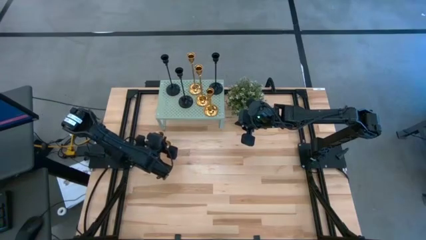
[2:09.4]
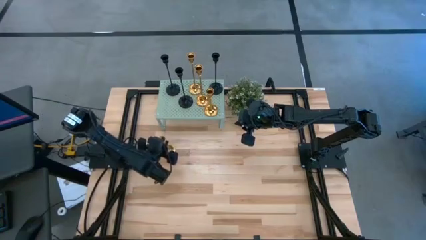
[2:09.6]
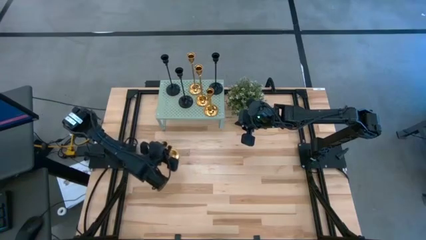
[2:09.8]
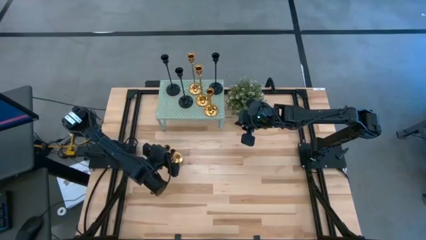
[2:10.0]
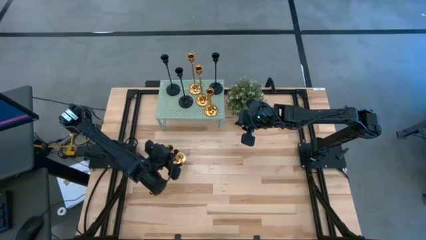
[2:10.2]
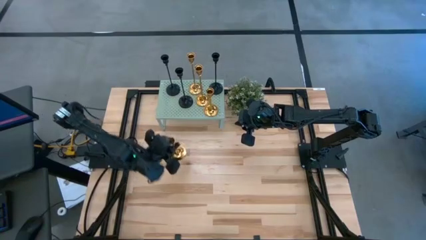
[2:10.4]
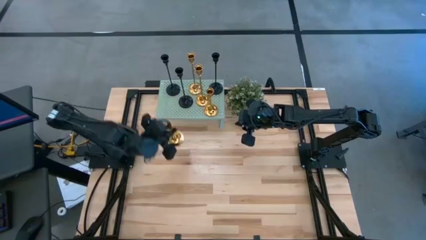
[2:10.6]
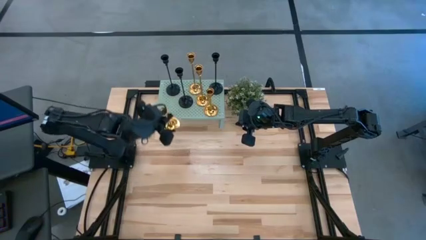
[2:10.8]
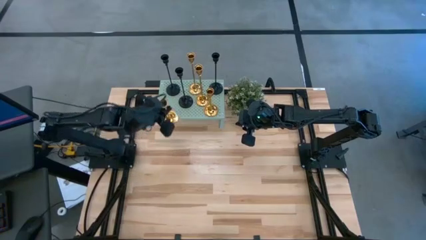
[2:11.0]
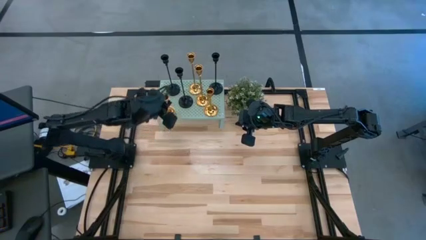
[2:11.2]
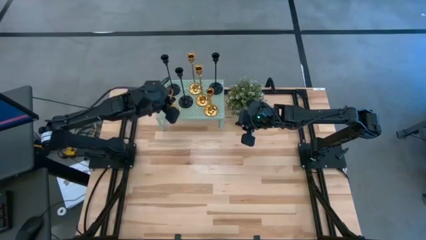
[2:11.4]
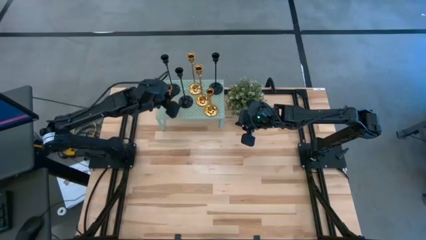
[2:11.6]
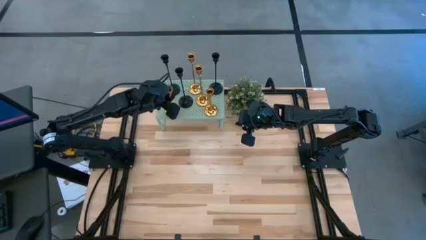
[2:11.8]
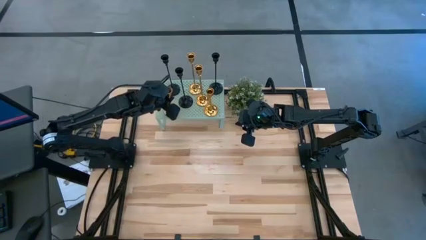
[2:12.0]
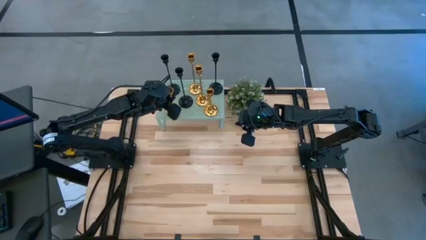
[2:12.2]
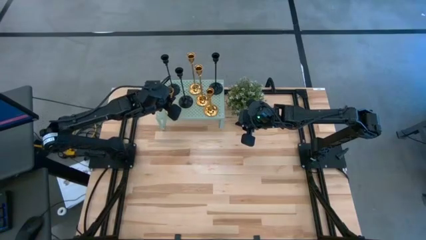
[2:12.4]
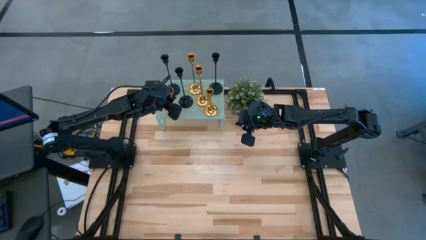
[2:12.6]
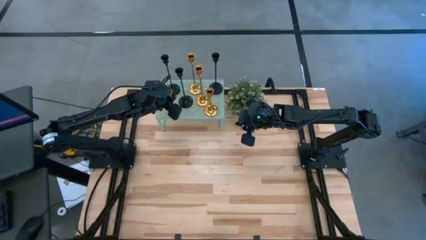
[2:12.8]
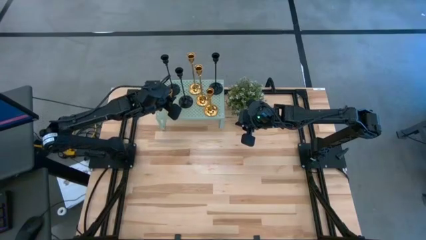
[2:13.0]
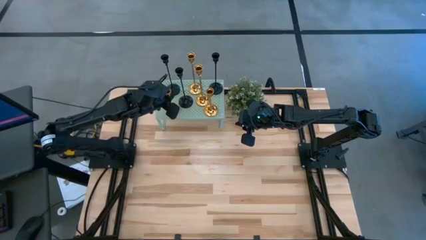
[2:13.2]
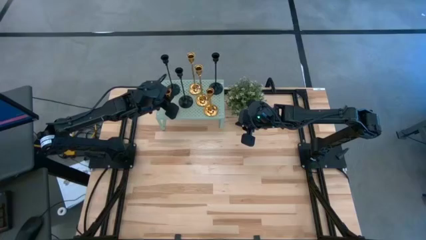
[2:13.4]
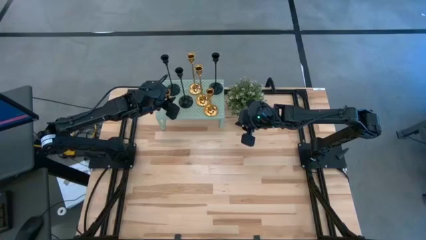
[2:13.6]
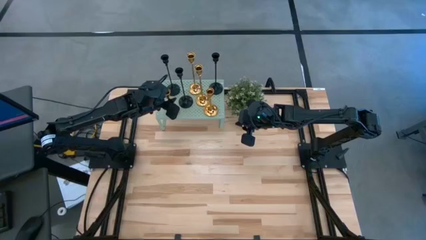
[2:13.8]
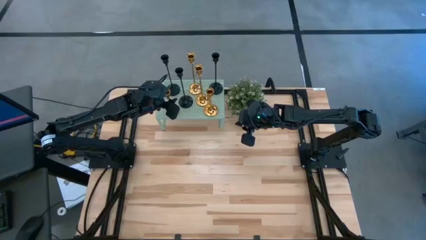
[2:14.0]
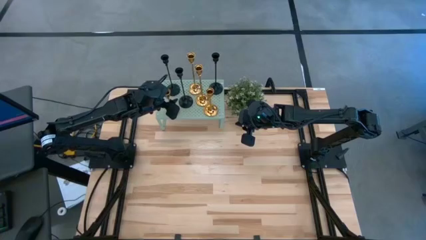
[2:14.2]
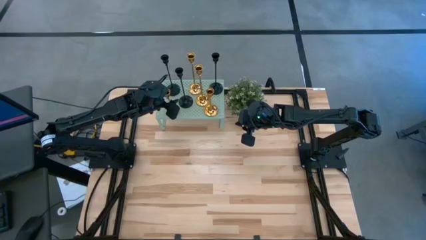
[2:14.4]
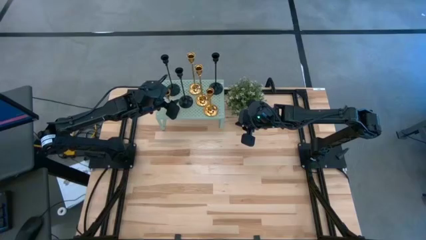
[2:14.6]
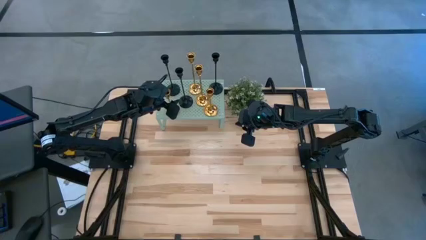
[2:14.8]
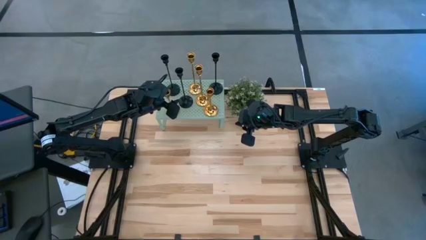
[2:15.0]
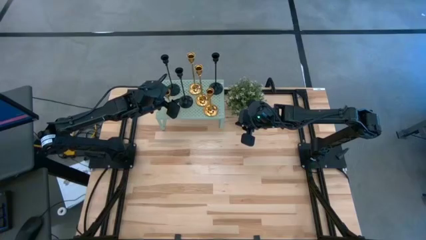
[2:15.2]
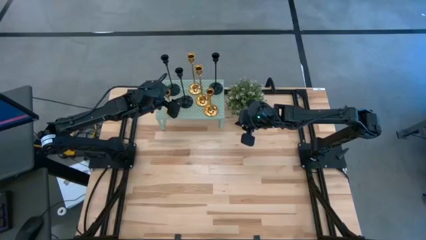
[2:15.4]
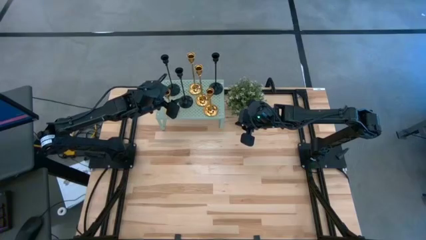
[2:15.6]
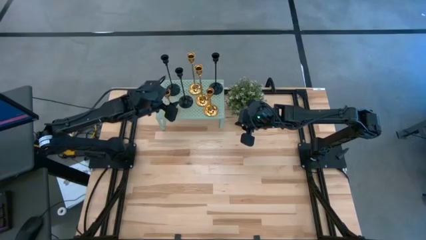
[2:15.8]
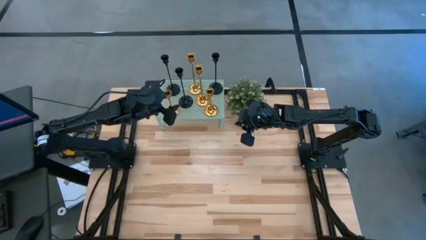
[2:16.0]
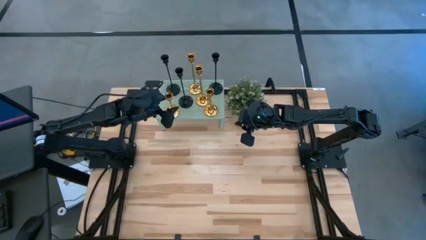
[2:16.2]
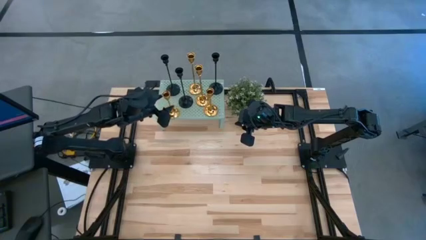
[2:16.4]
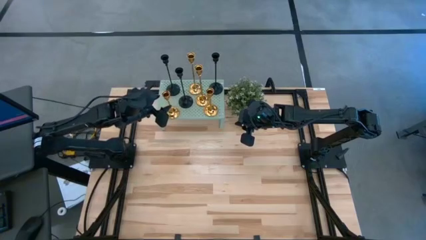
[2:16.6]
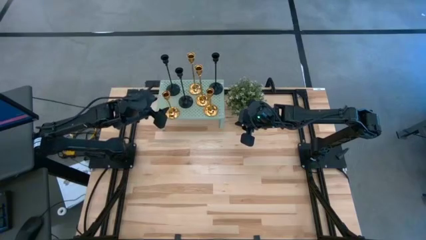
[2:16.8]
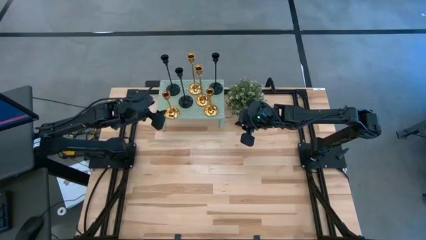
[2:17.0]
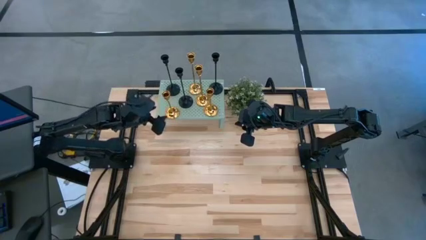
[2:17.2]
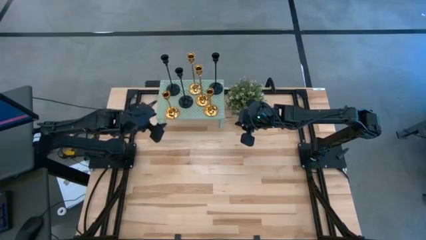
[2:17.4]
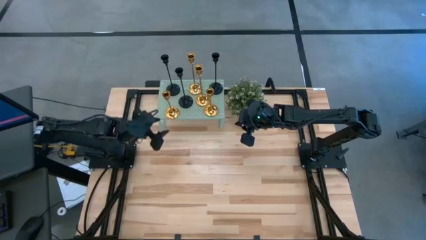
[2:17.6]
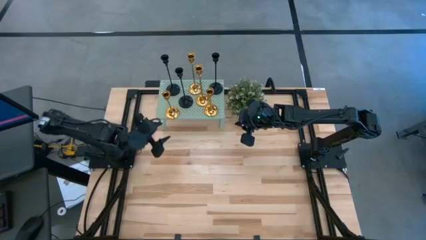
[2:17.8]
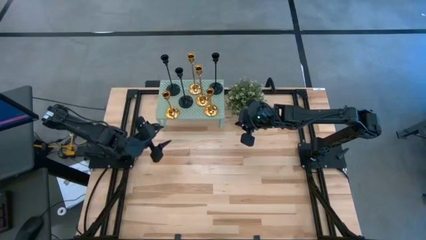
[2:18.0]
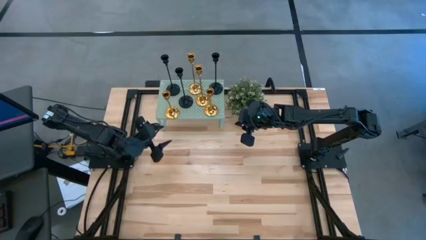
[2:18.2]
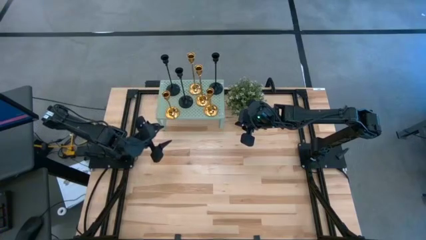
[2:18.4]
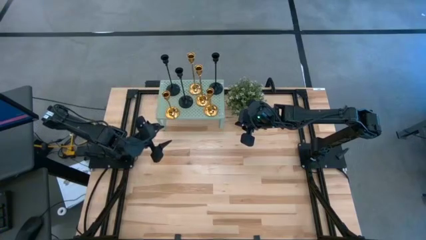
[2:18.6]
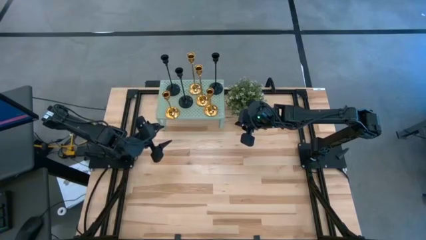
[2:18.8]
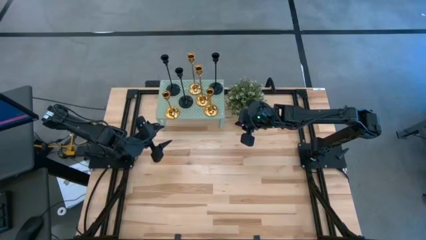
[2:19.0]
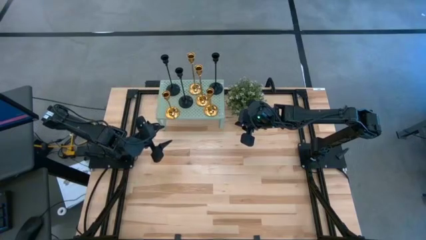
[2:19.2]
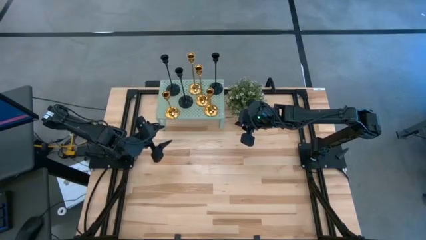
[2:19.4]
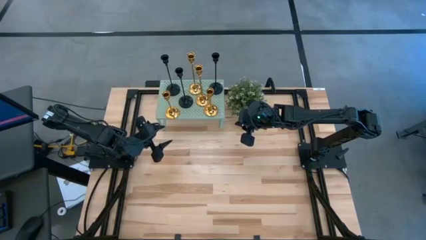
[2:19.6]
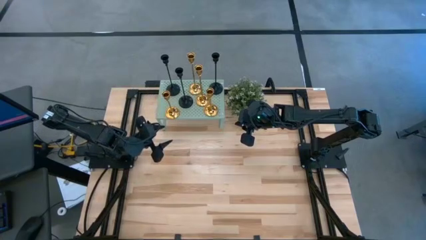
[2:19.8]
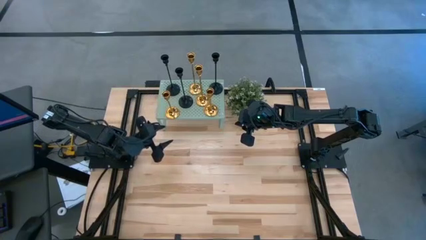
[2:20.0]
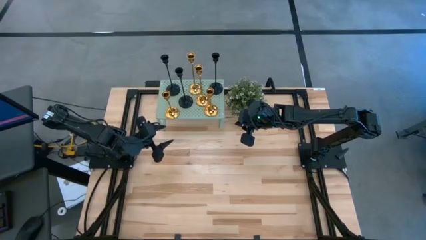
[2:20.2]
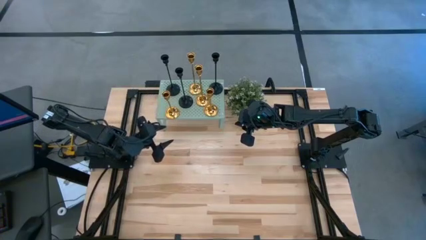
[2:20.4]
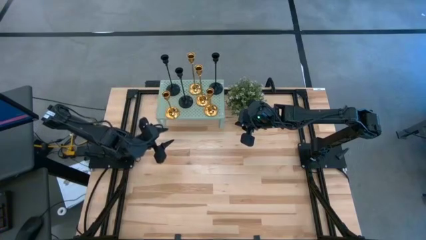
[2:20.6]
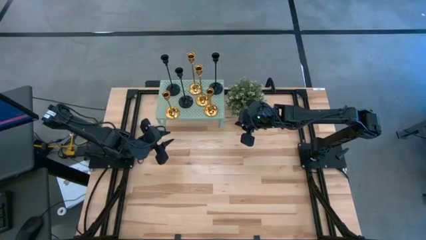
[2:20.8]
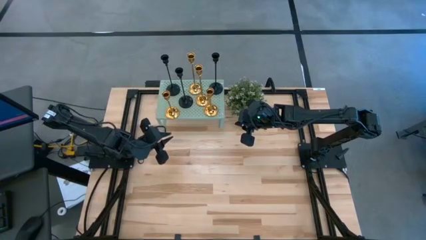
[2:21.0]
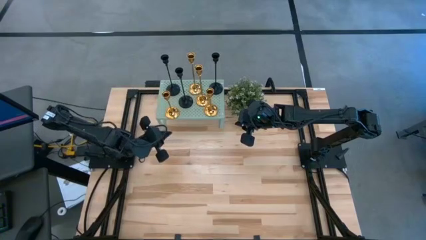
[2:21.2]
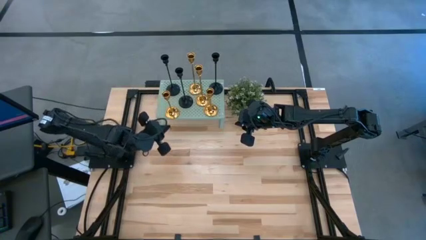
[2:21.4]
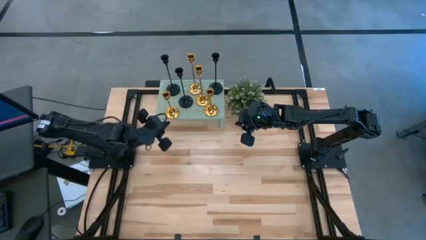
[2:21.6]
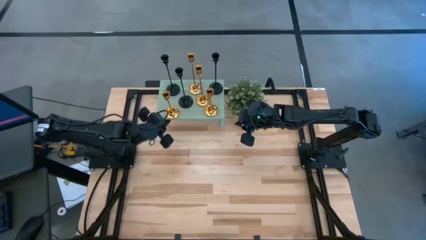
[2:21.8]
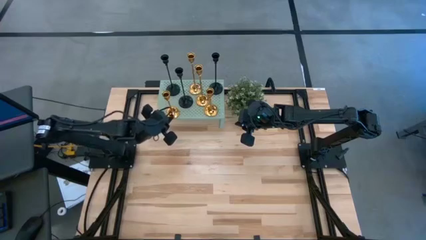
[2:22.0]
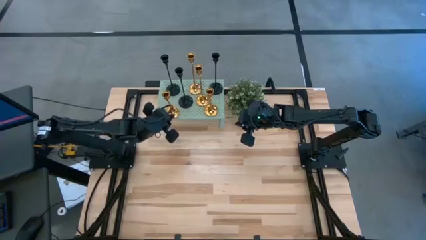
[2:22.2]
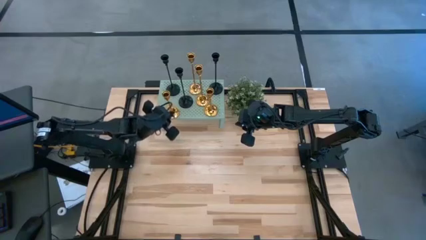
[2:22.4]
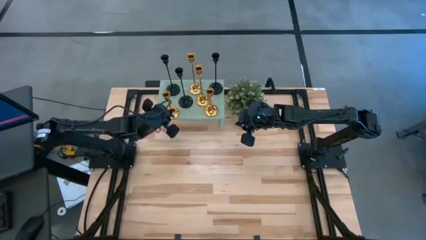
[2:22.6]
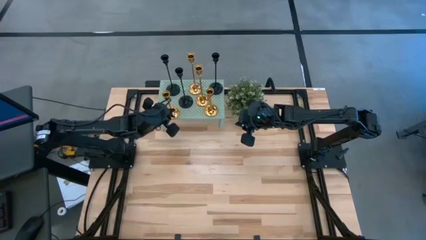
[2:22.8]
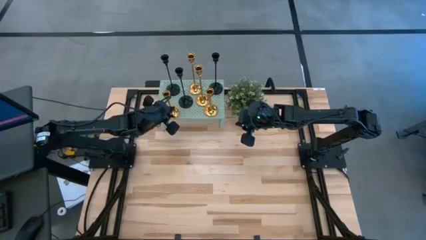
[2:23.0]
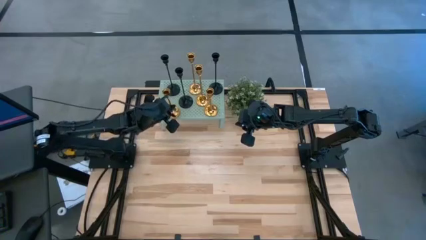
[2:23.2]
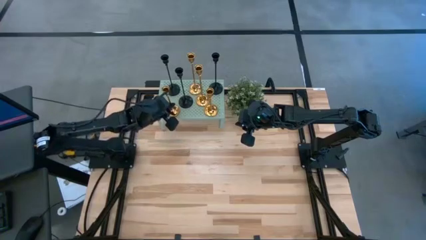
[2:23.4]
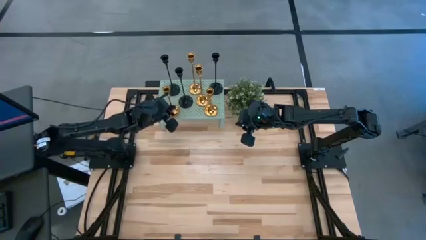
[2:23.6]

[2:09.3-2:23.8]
Task: Pick & Place candle stick holders
Put the gold candle holder on the shelf aligned with the gold candle holder

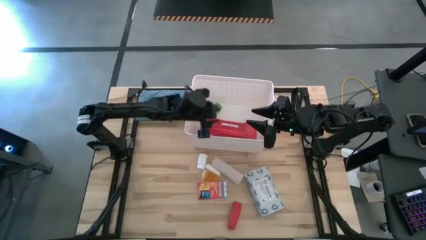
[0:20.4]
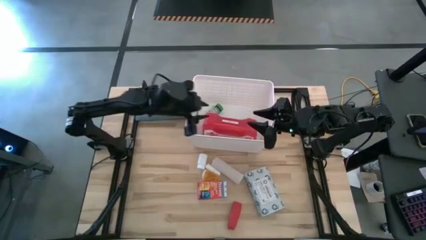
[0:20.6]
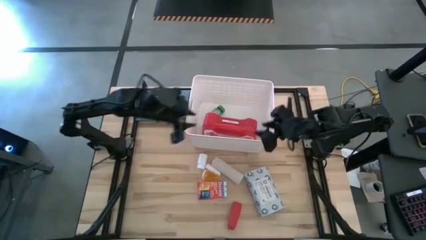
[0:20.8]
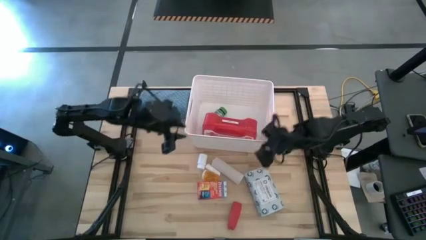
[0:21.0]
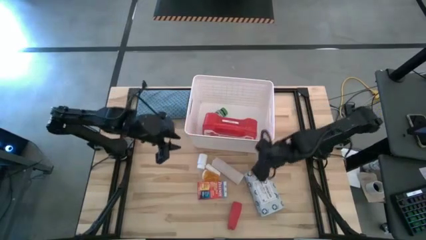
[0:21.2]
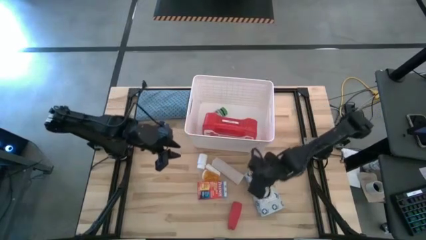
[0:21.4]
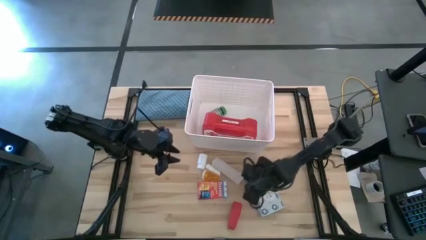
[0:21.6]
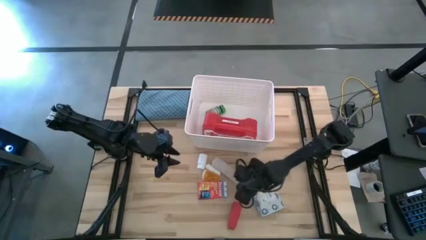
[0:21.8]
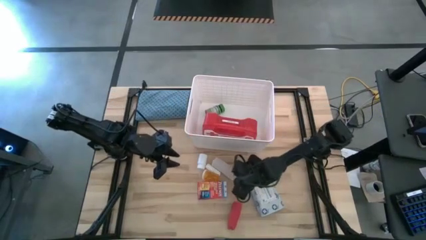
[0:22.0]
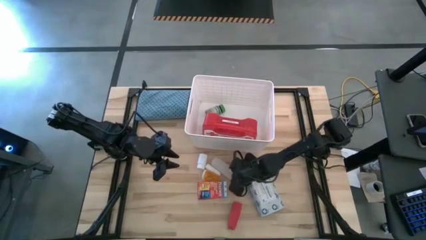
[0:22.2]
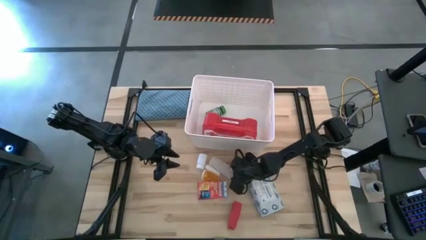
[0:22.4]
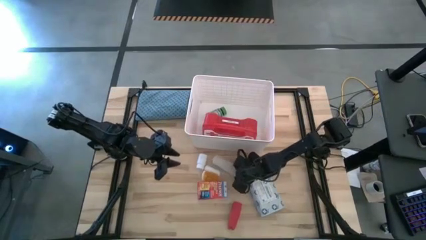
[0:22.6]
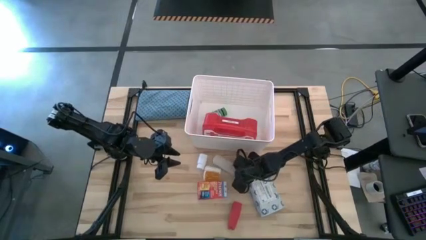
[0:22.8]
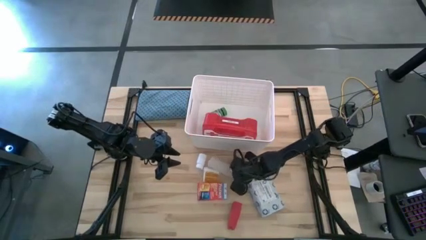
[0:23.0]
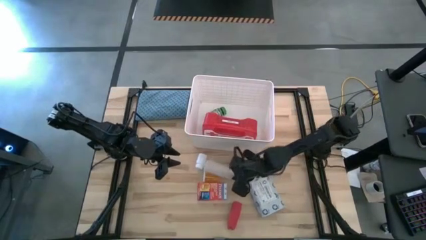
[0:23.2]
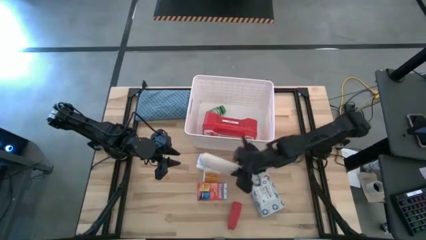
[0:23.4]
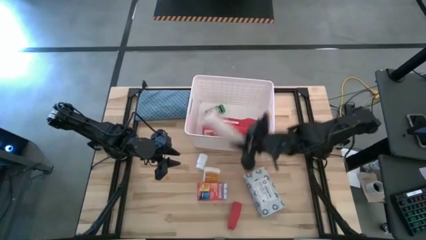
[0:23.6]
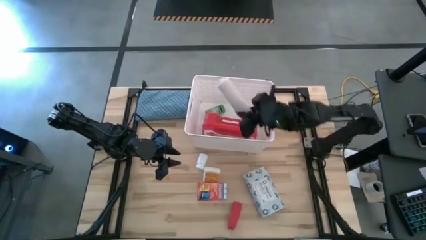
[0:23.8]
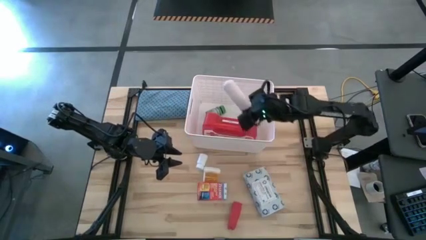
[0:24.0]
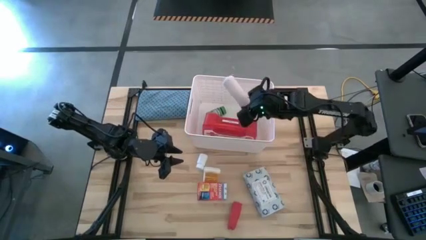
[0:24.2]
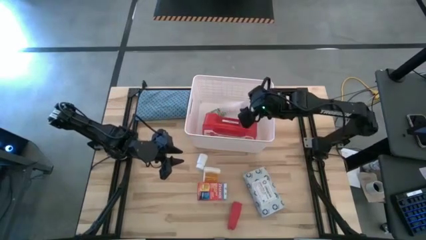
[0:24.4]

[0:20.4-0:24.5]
Task: Pick & place medical supplies in basket/bin
Put the white bandage into the white bin
